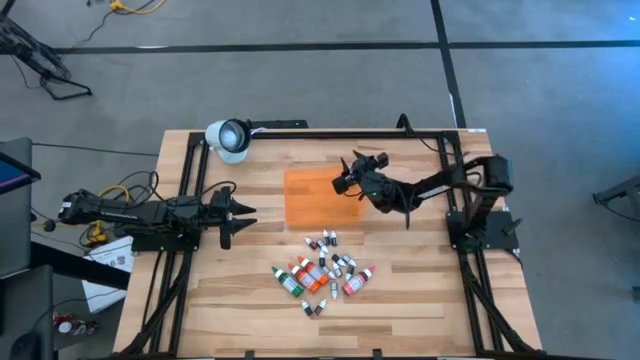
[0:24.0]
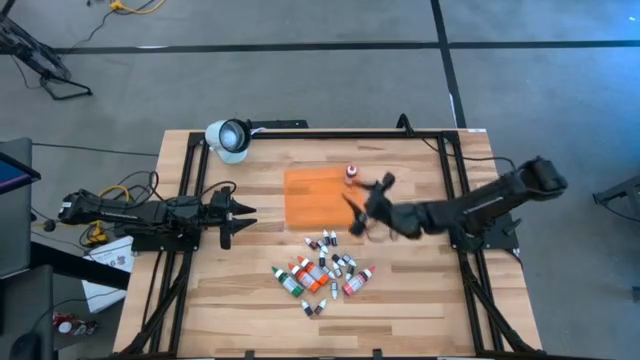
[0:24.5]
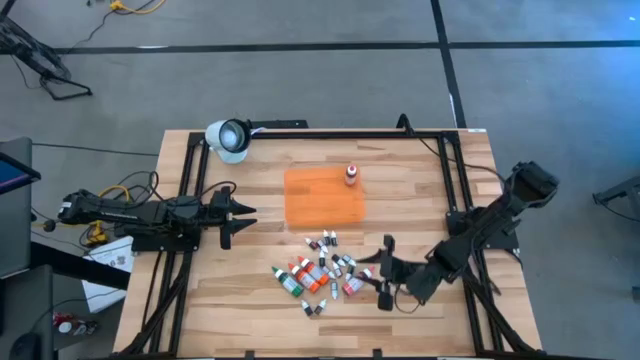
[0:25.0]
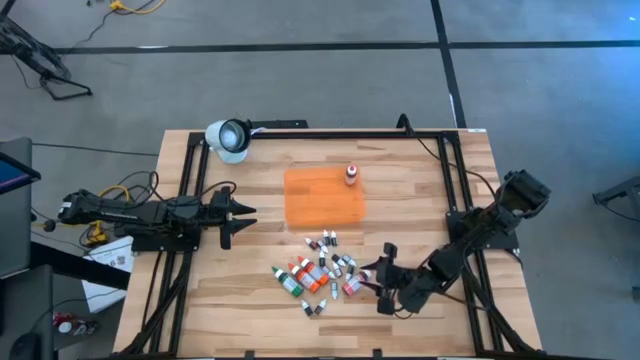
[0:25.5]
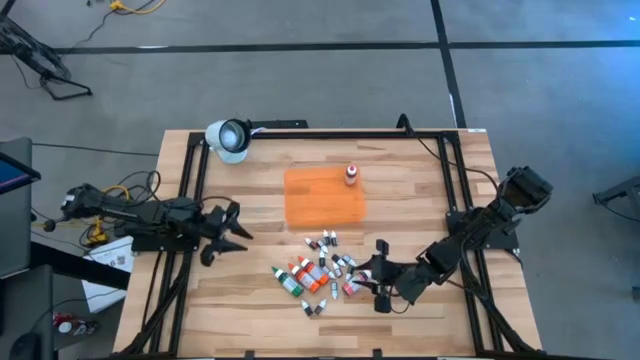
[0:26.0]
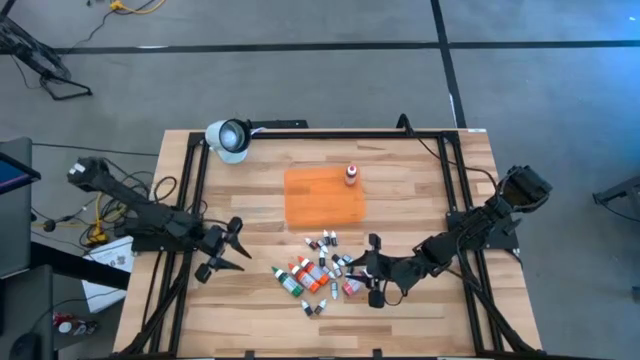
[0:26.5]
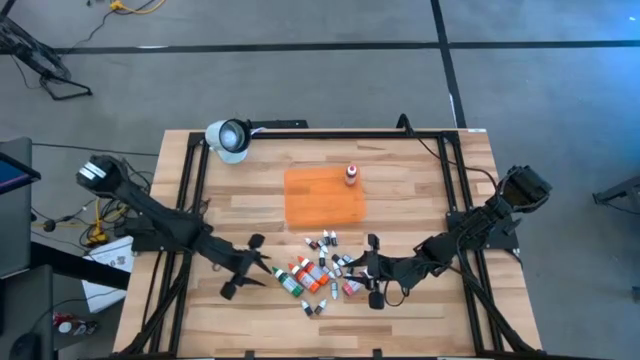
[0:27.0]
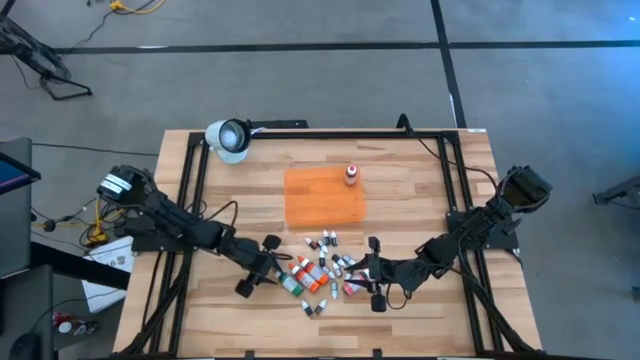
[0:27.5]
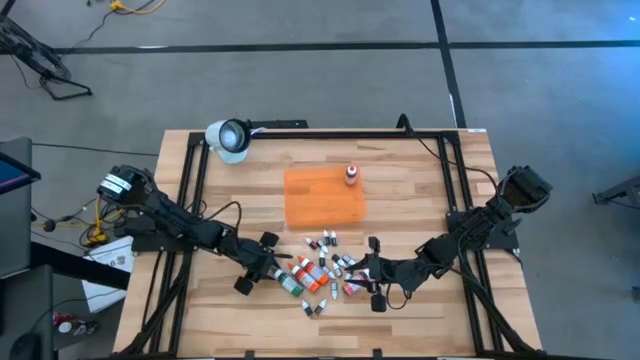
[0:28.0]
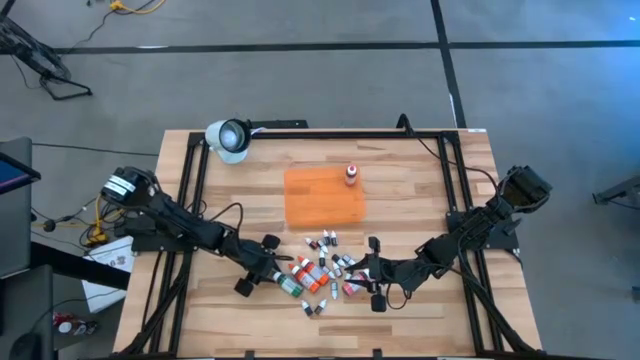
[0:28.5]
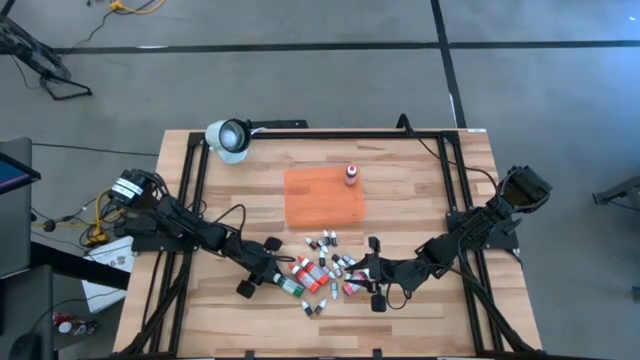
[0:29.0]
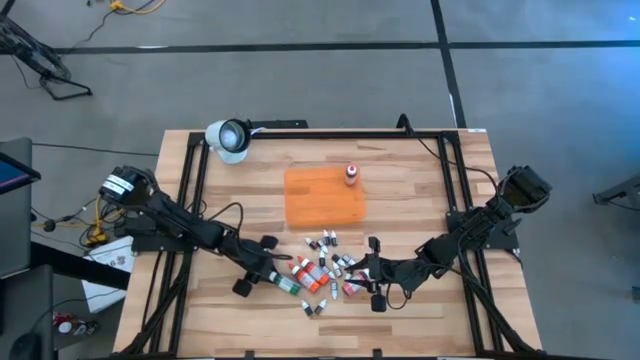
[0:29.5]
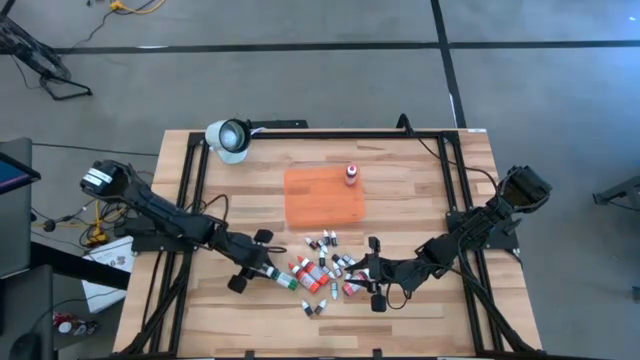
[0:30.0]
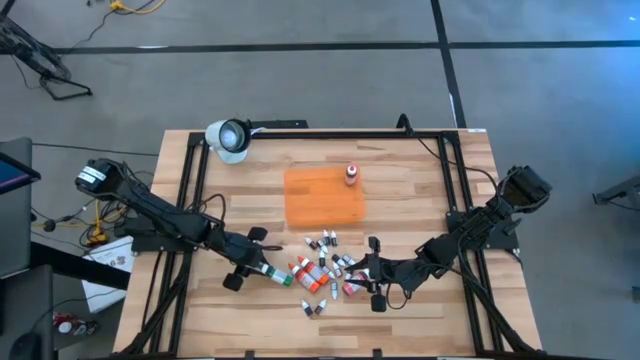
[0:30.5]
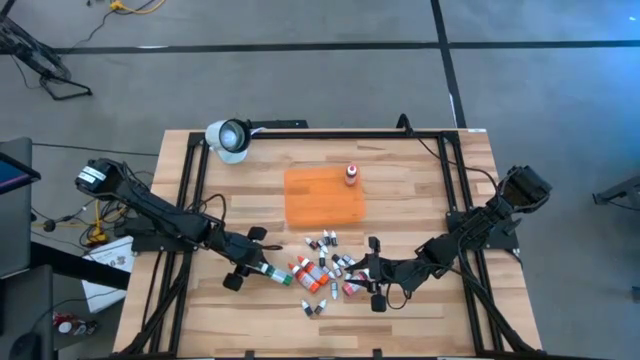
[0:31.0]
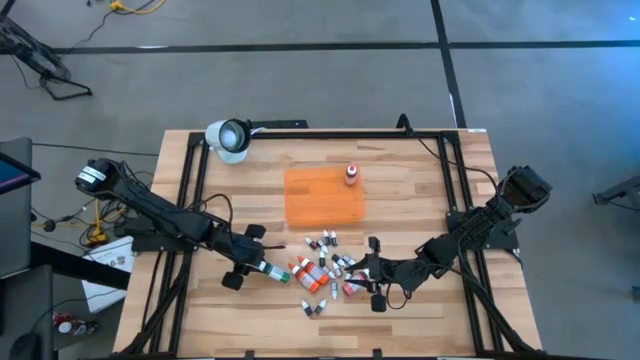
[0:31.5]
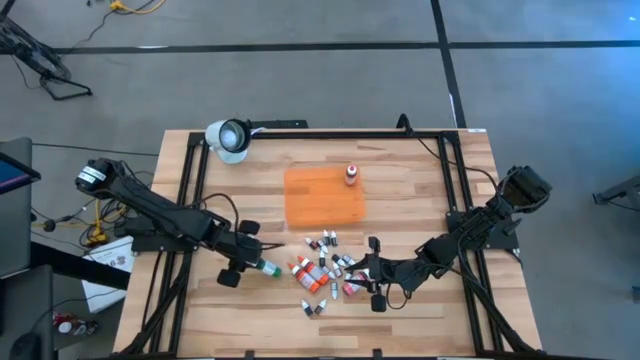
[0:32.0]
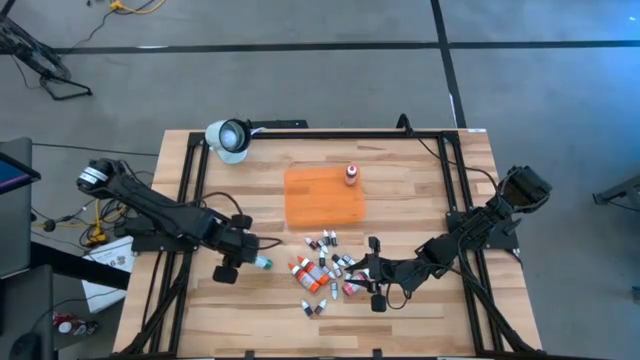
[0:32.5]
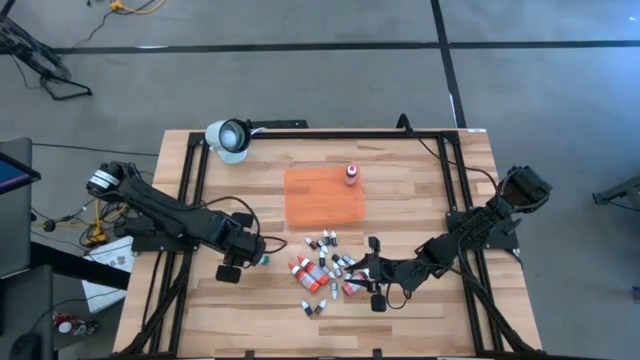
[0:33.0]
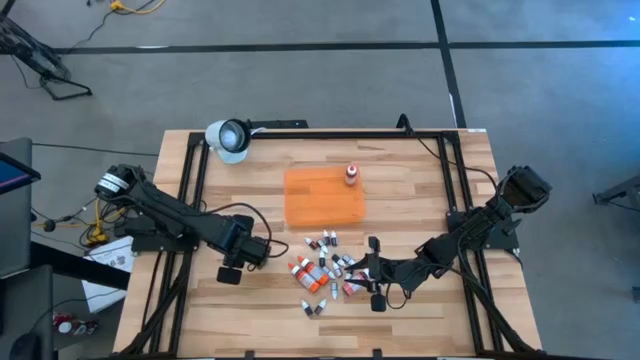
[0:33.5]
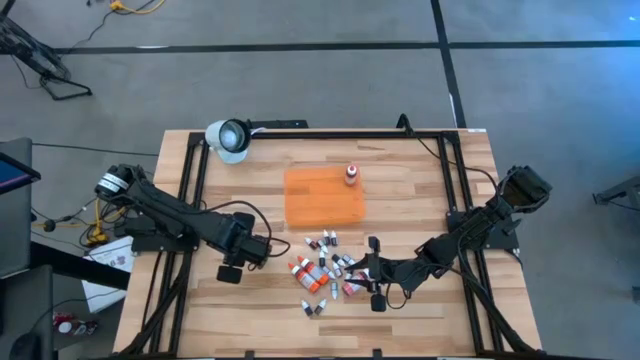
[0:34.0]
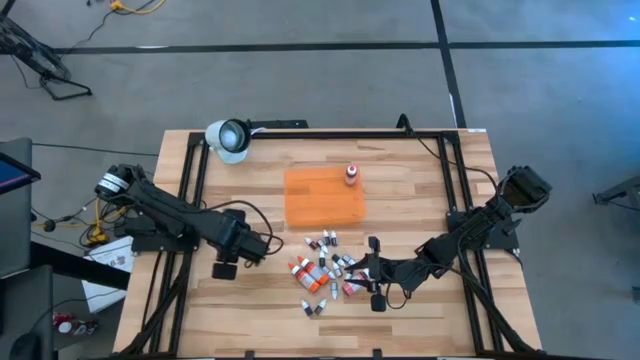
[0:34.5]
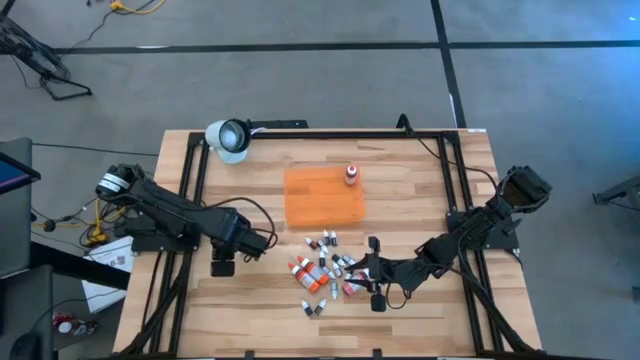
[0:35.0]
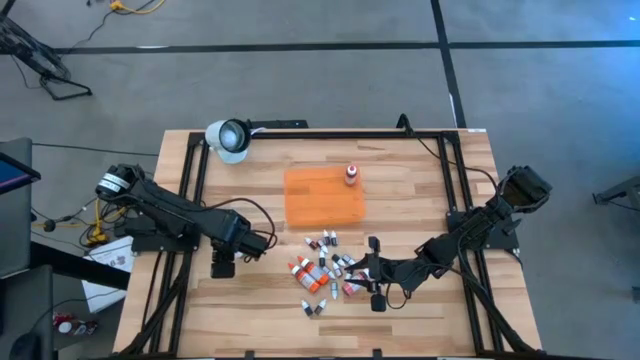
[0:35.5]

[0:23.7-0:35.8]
Task: Pick & Place food coloring
Put the big green food coloring bottle into the orange bin

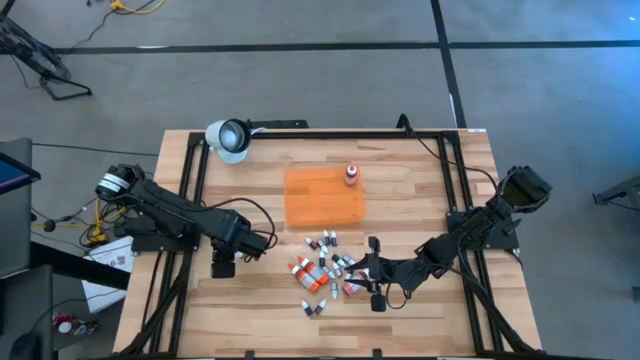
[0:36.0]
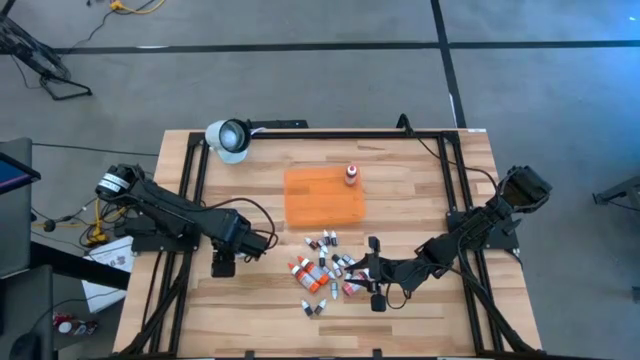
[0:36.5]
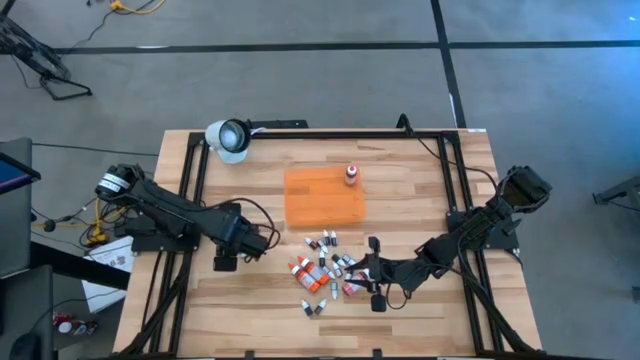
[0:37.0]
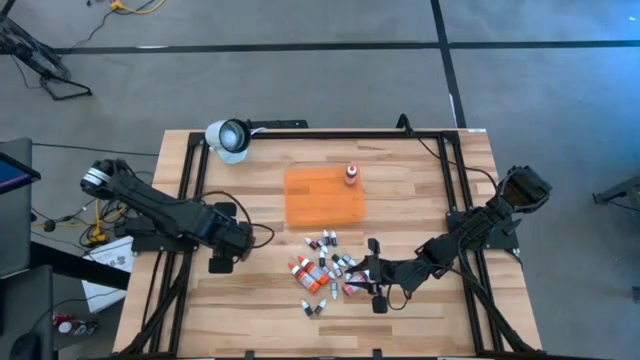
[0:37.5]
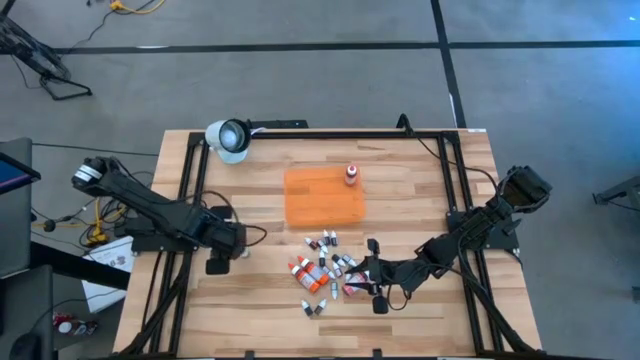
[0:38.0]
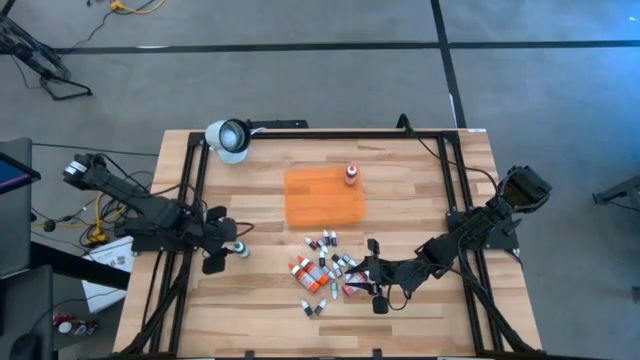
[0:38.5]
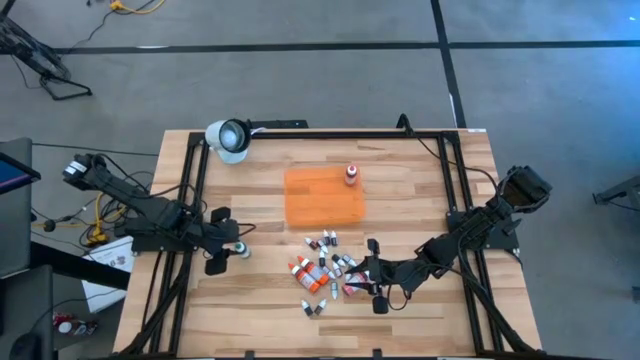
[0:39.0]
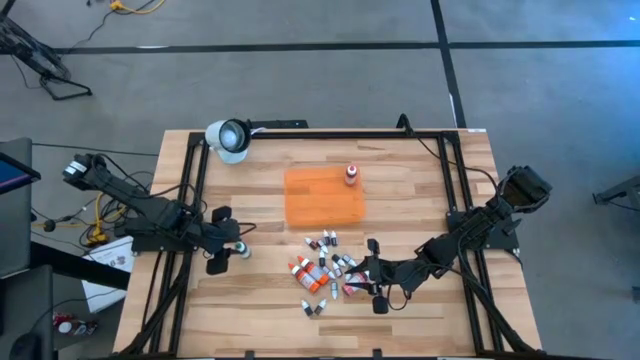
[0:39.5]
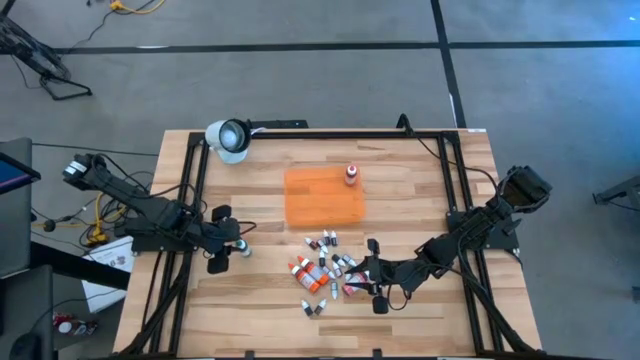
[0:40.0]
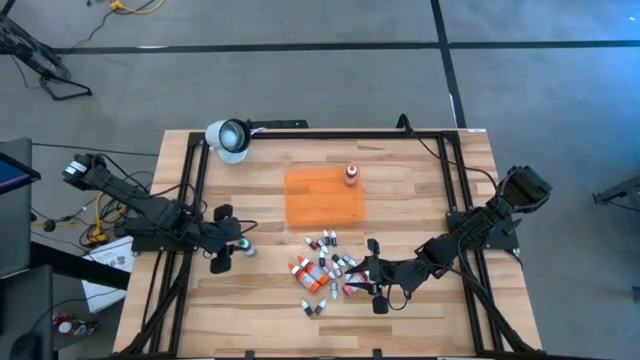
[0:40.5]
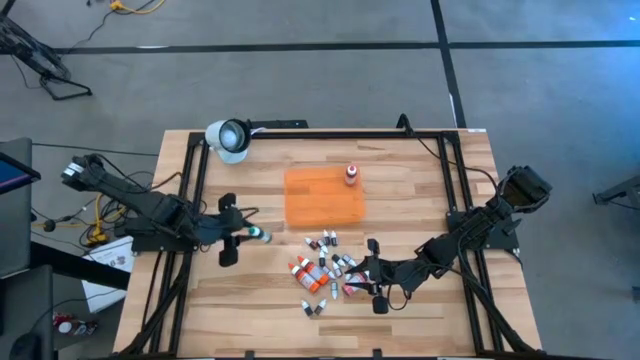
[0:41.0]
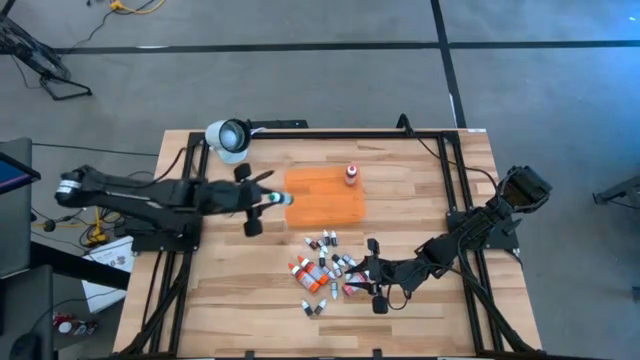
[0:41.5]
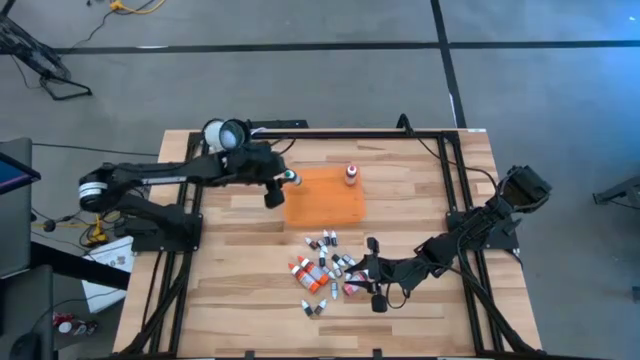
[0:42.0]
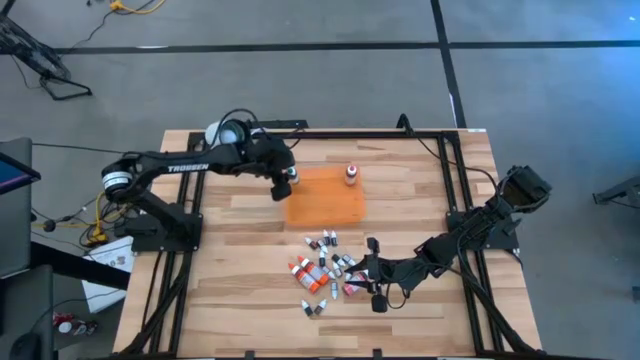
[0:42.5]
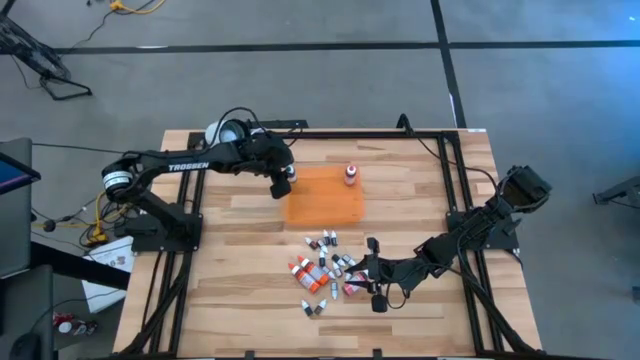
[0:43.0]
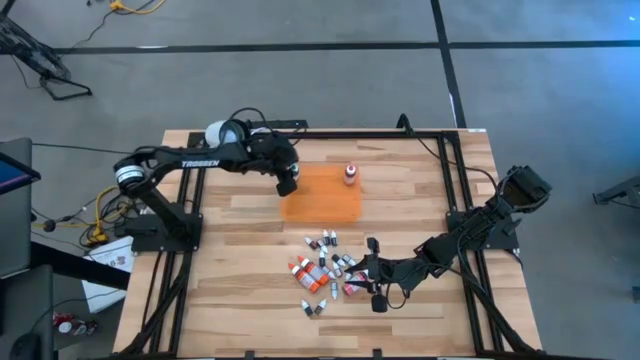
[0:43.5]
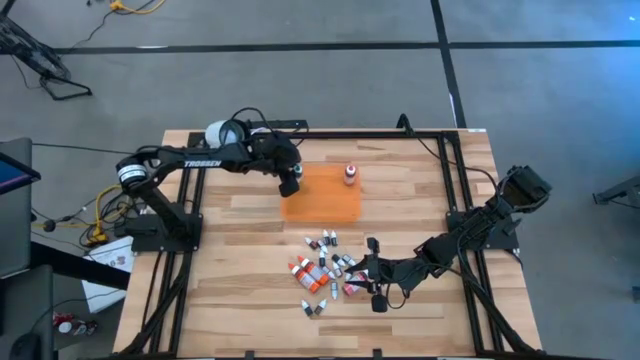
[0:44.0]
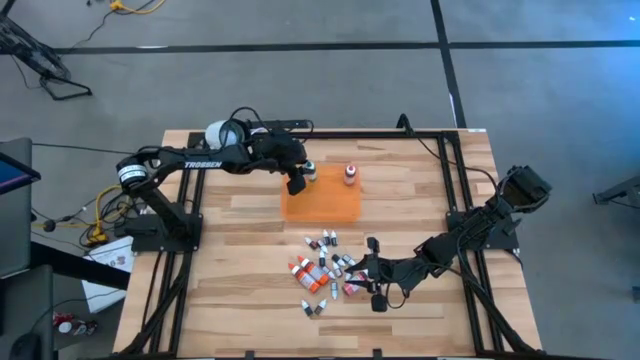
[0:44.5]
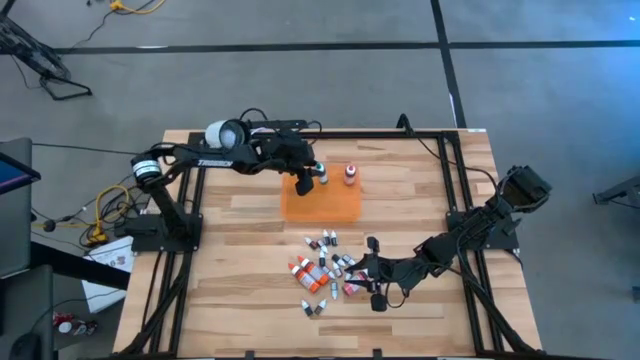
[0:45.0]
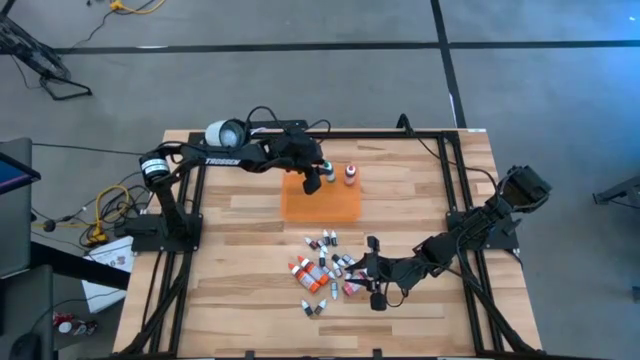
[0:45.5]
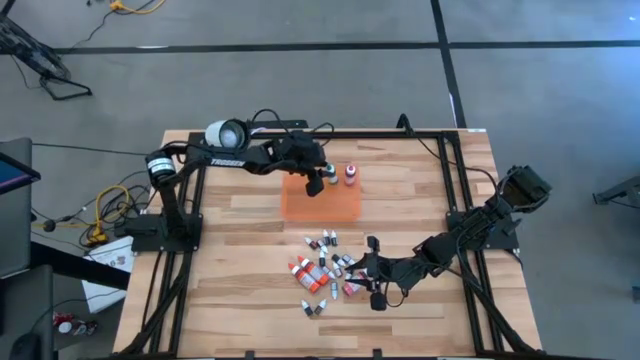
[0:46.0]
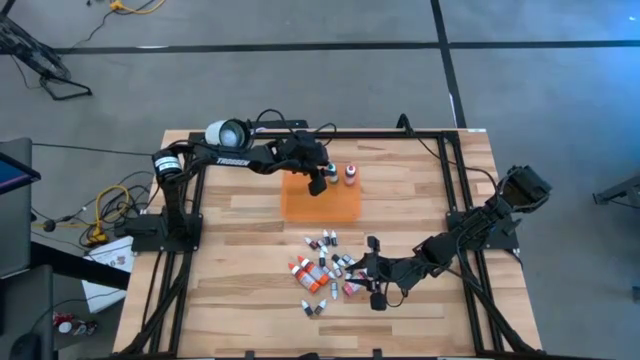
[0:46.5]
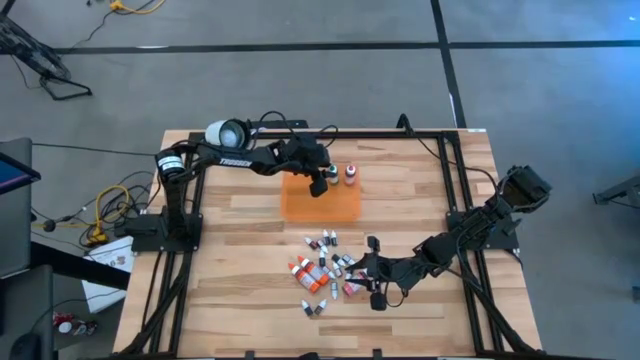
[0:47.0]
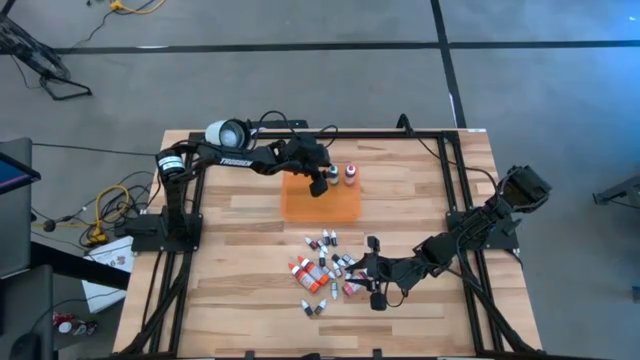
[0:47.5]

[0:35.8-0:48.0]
Put the big green food coloring bottle into the orange bin
